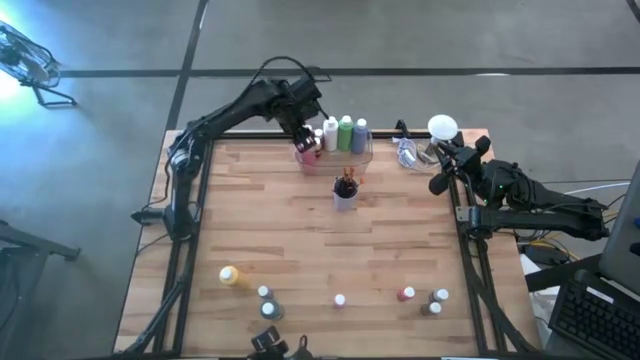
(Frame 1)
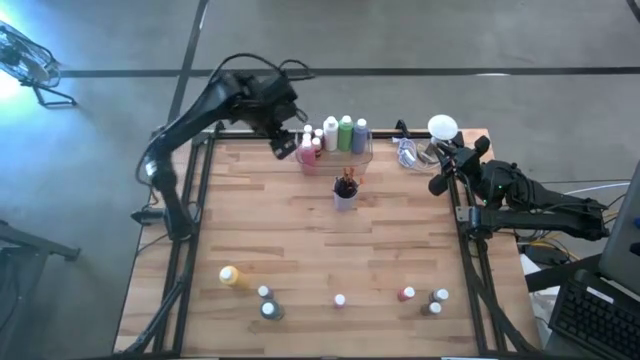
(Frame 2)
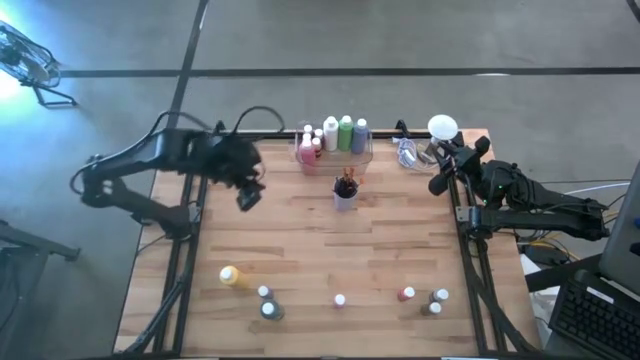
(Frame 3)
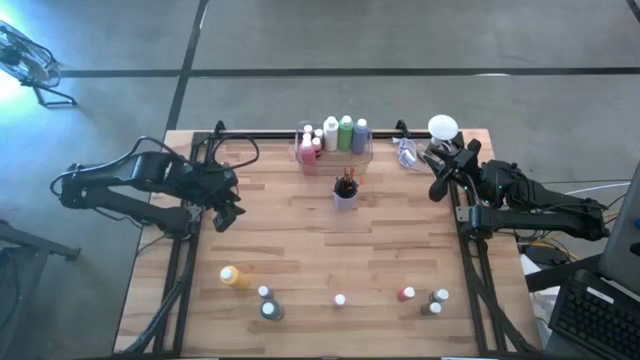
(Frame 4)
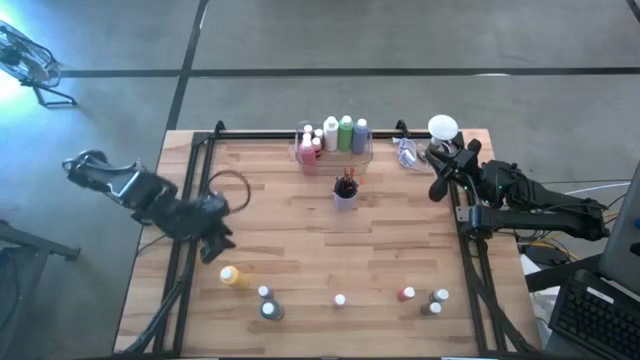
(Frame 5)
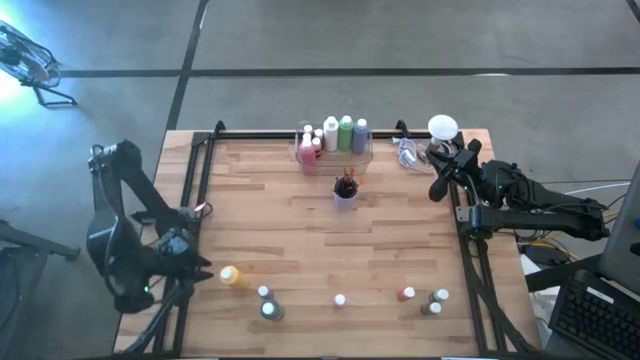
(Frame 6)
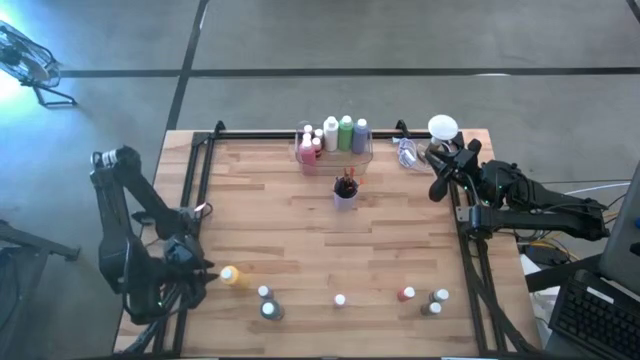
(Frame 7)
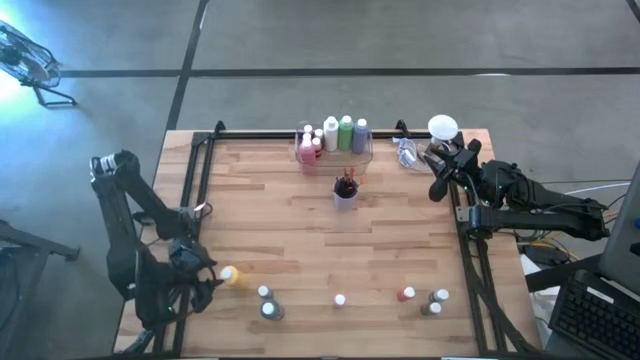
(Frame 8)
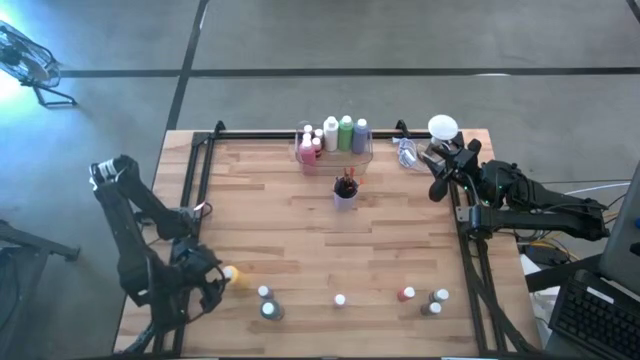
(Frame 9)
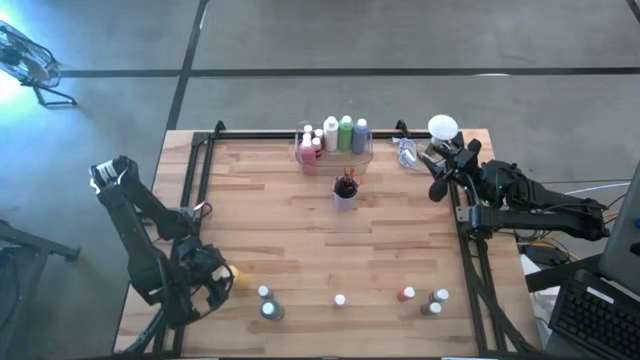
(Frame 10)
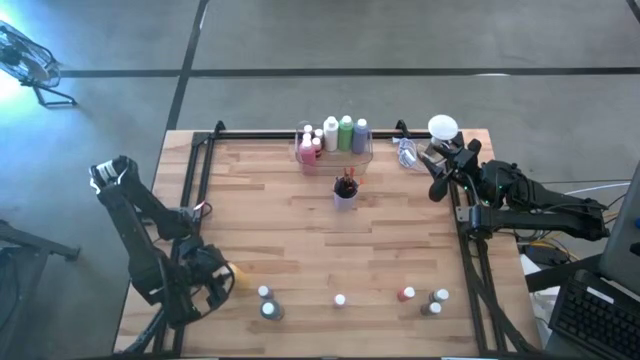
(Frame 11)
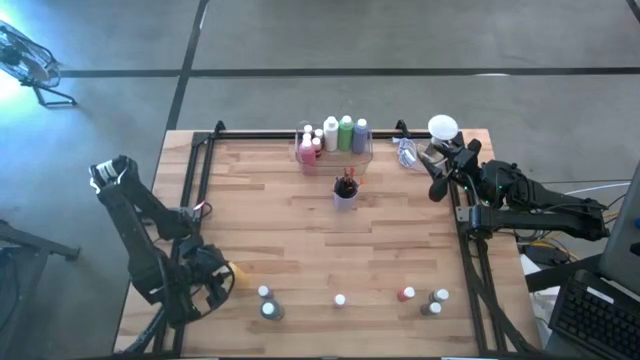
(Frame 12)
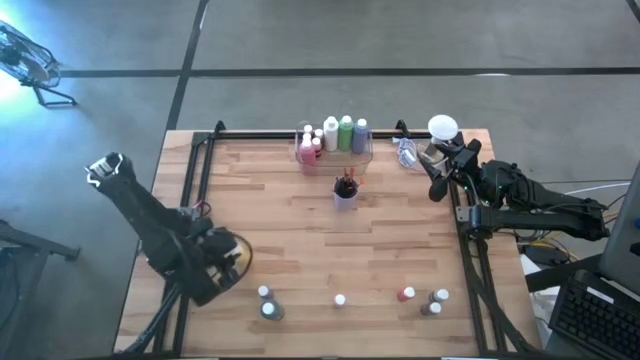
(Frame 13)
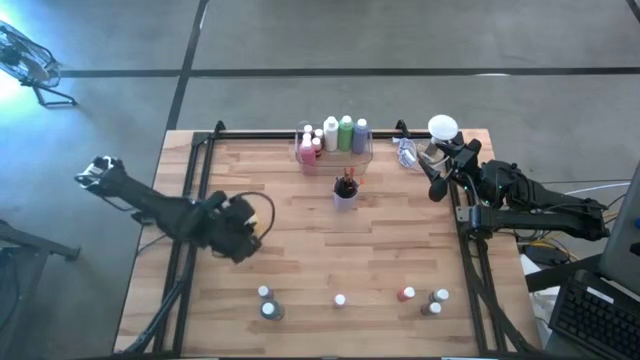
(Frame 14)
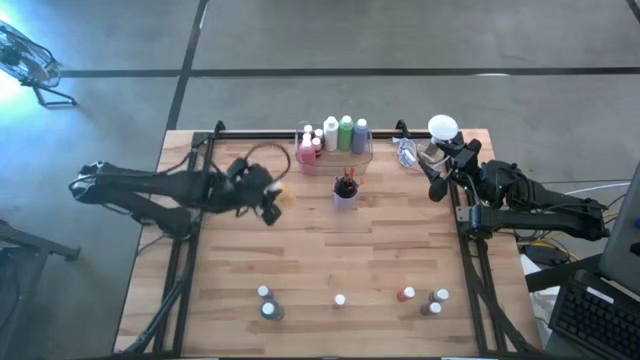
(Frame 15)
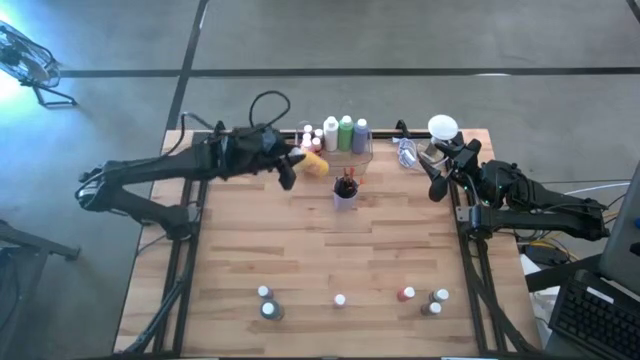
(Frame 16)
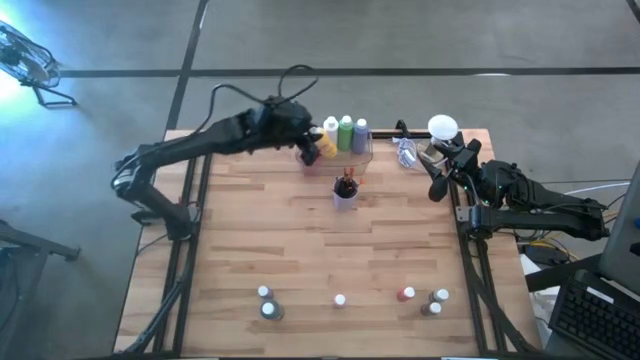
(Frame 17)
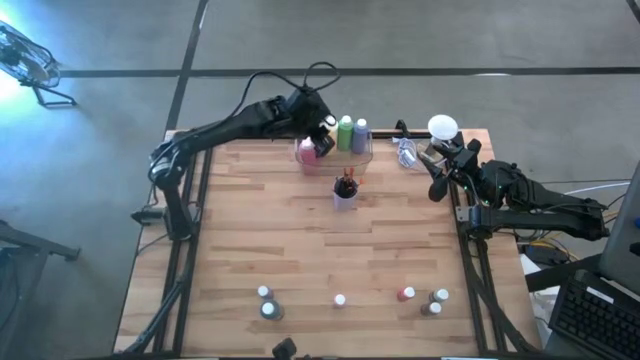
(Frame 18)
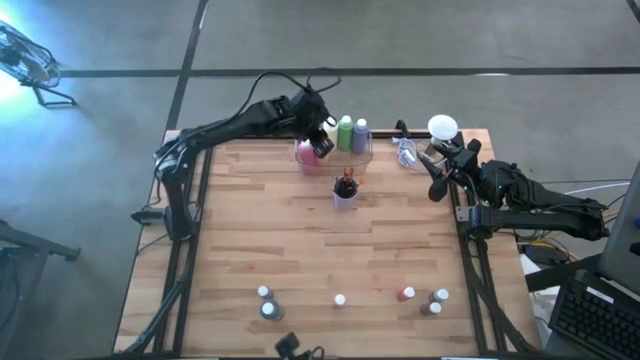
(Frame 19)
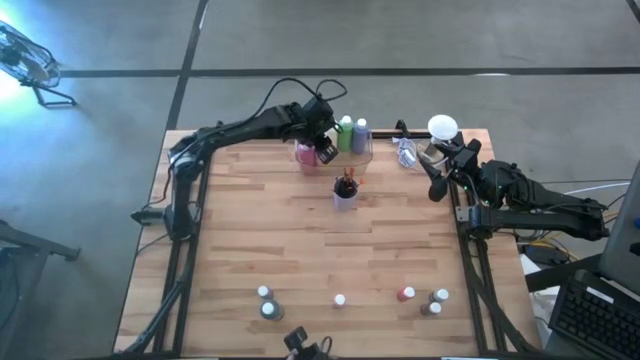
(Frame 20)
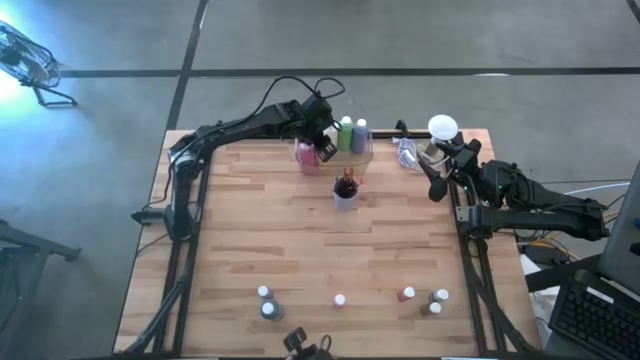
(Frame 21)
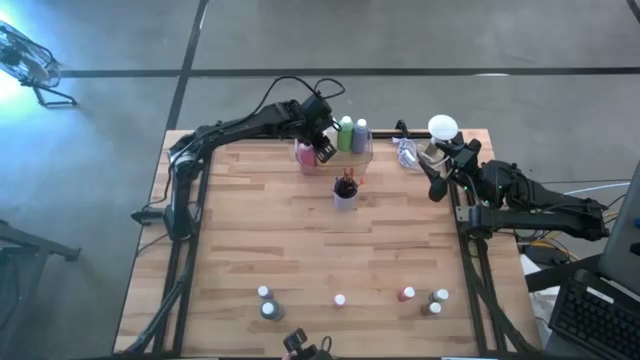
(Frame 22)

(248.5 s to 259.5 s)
Task: Pick & Place Paint Supplies
Put the yellow paint bottle into the transparent bin

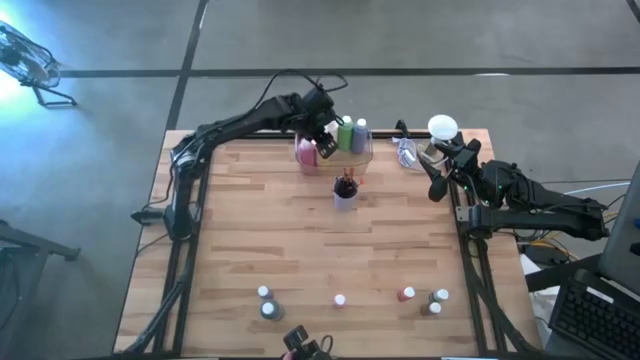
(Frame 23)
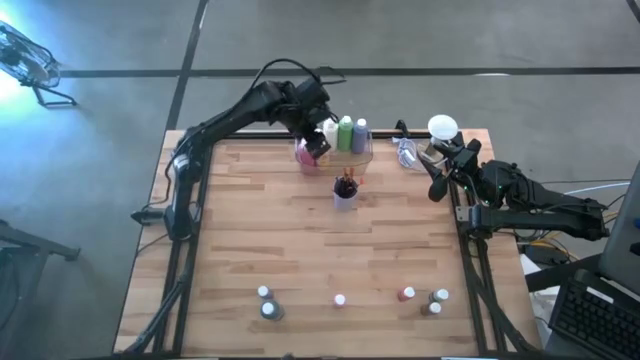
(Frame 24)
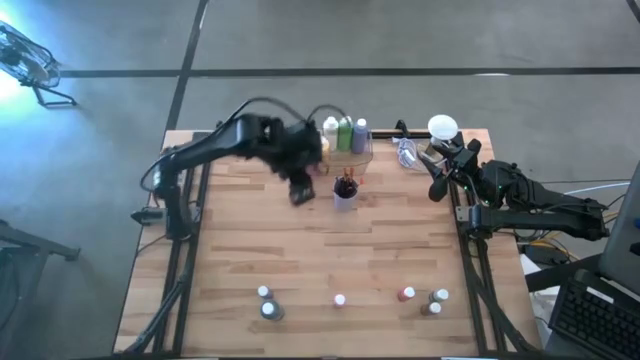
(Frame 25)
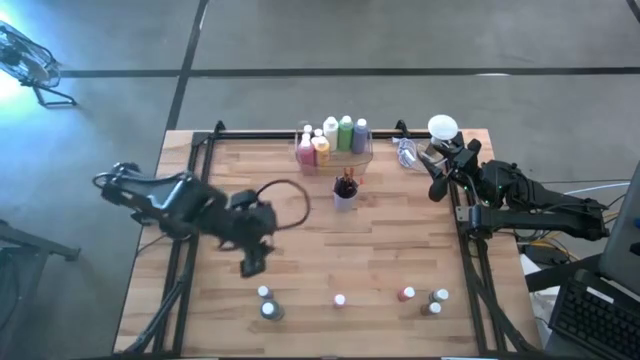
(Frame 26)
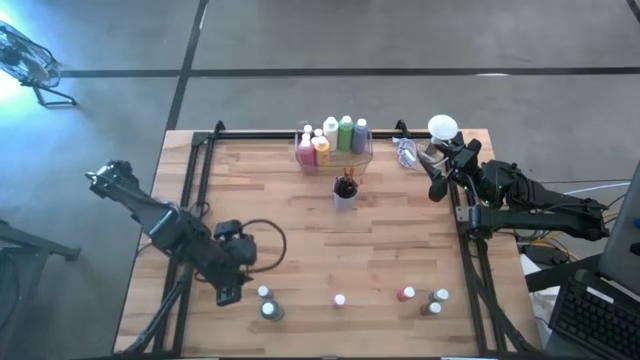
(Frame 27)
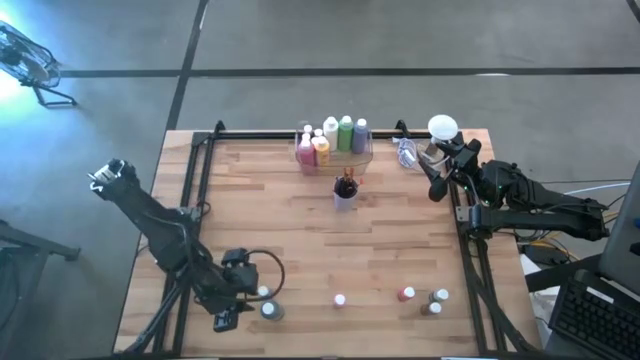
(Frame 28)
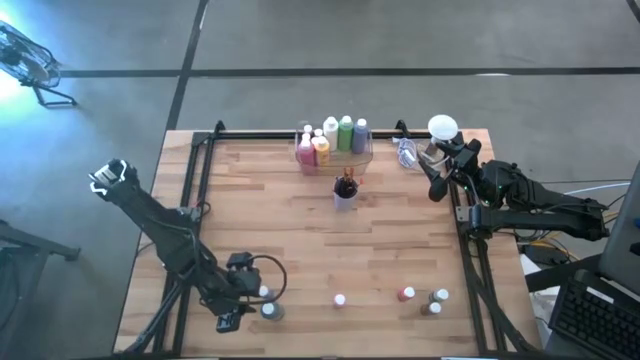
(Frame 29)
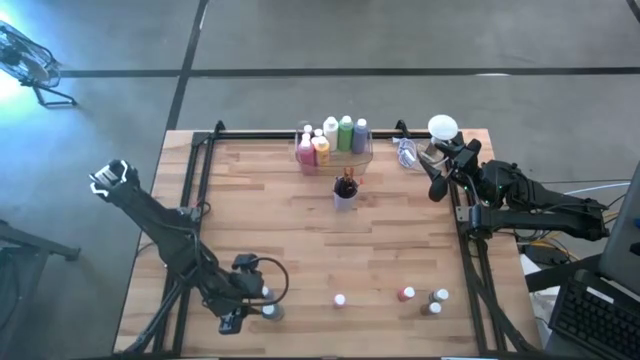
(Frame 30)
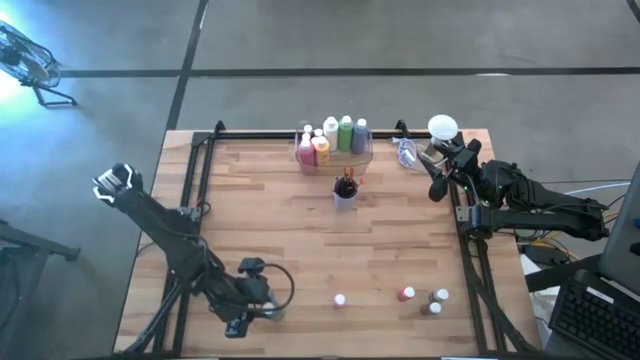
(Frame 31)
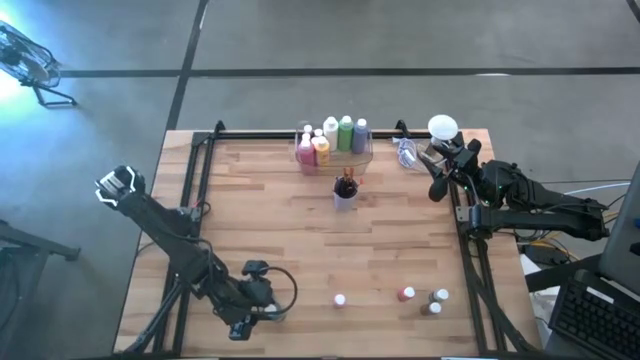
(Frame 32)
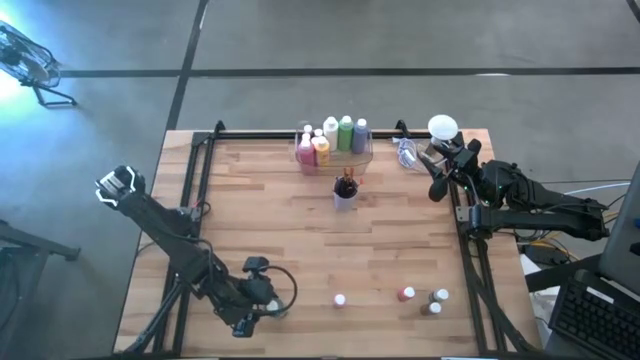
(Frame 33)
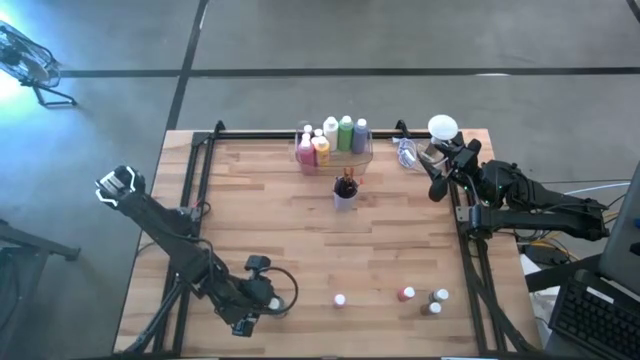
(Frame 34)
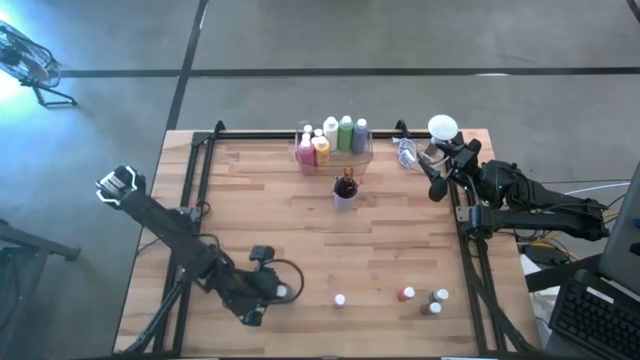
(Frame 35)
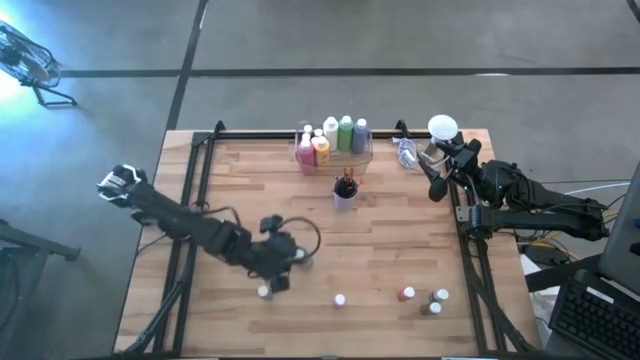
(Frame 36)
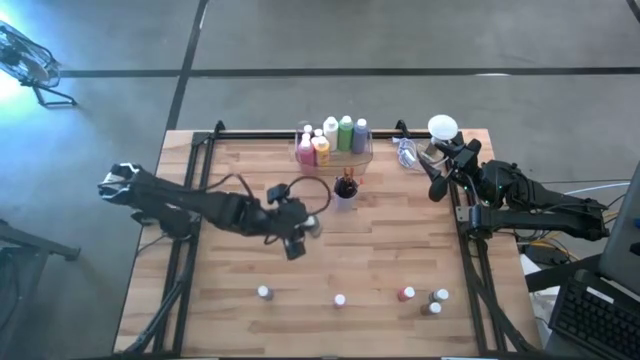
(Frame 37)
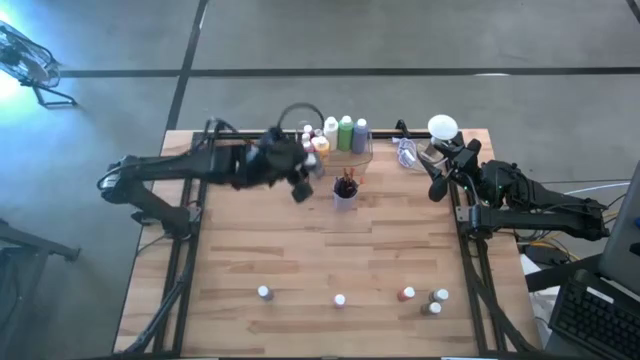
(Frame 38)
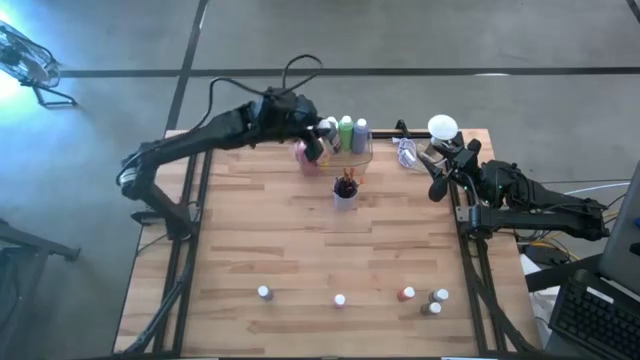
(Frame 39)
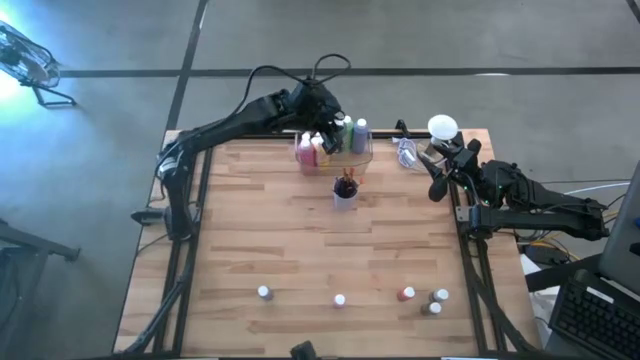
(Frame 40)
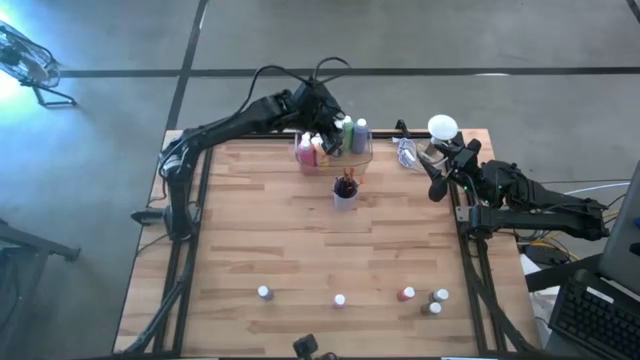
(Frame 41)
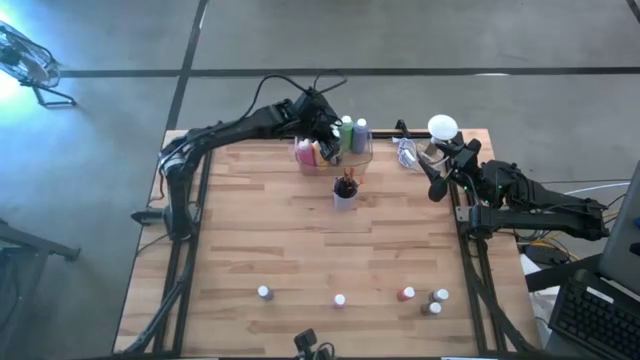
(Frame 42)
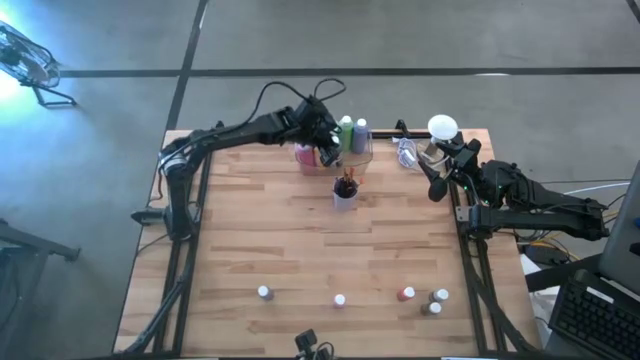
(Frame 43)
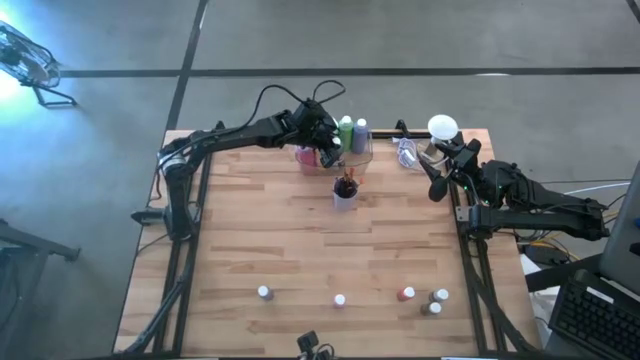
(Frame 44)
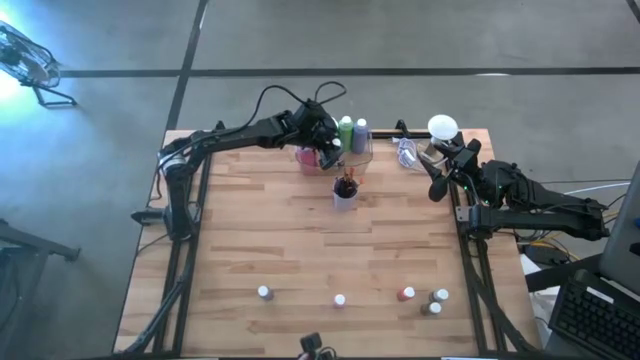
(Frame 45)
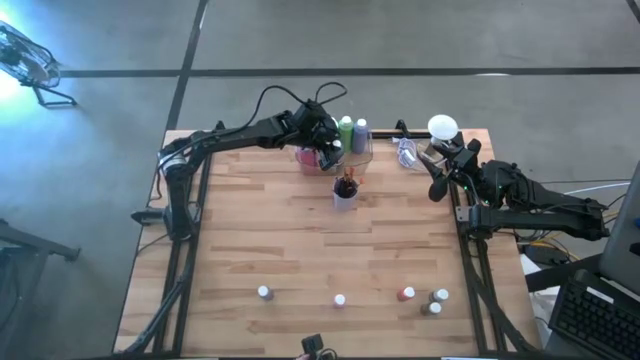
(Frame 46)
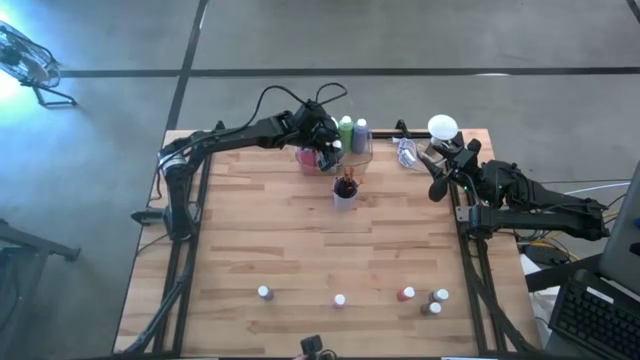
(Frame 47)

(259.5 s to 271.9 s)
Put the purple paint bottle into the transparent bin
